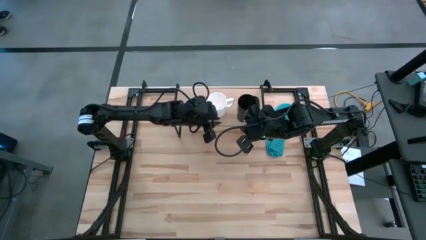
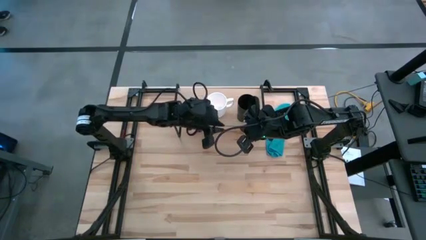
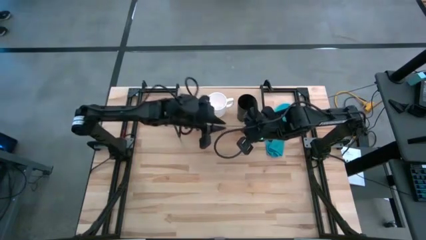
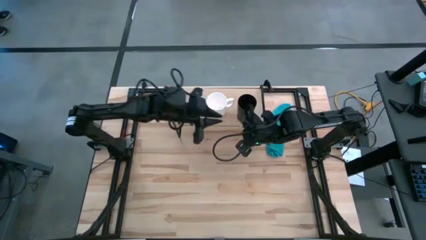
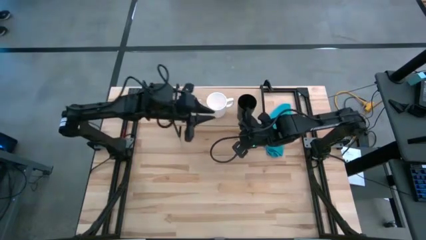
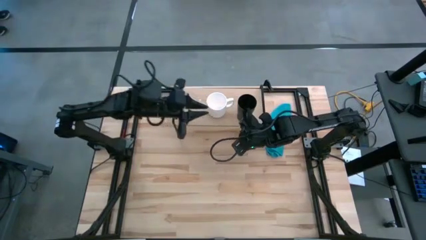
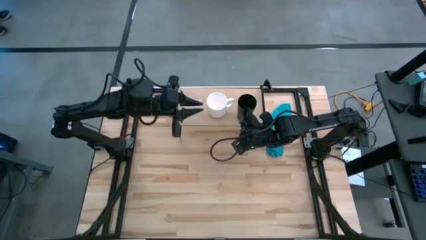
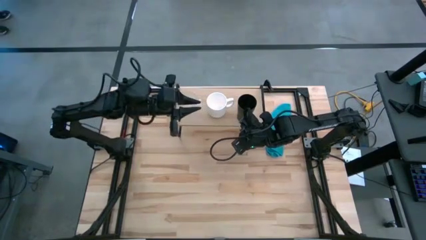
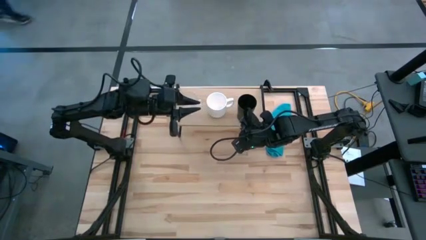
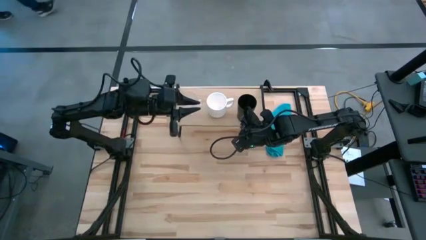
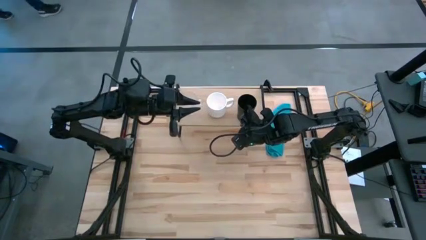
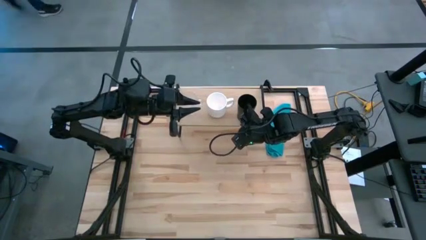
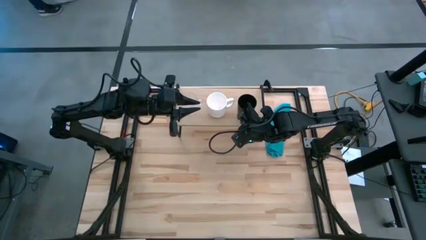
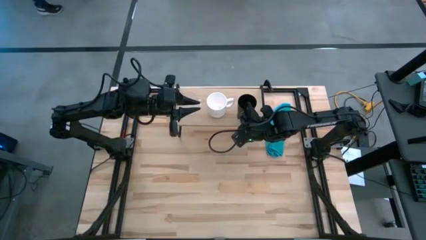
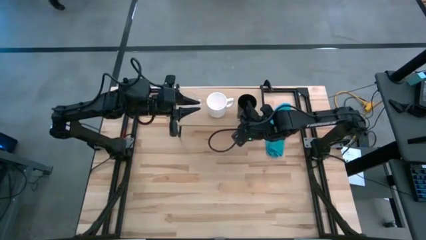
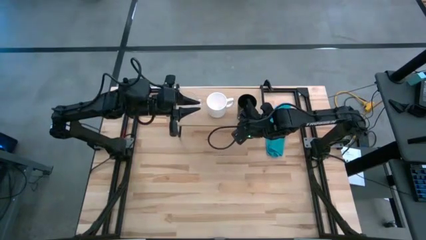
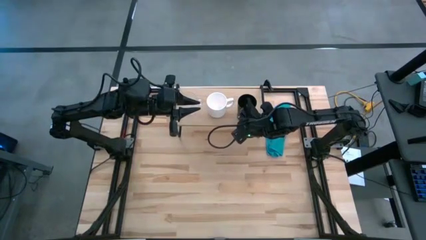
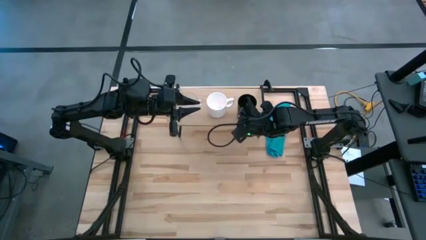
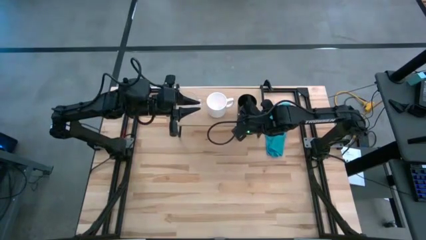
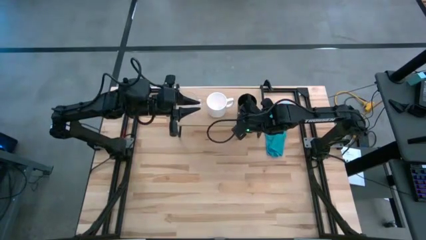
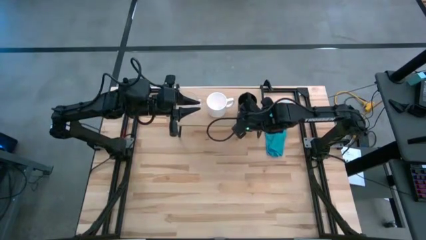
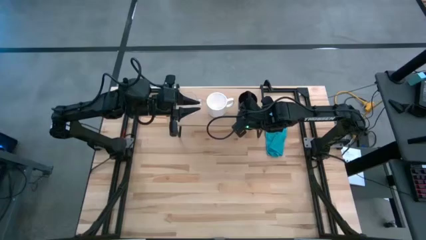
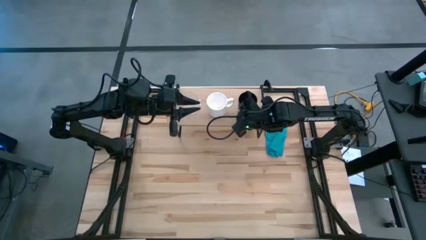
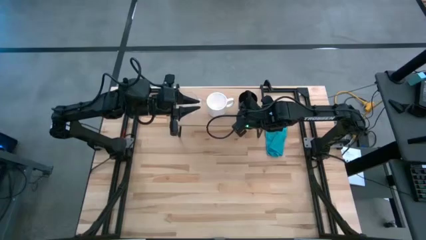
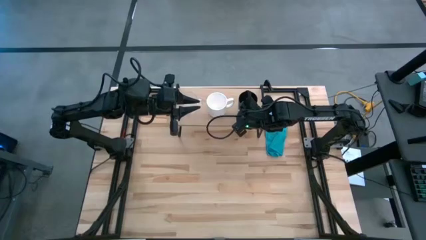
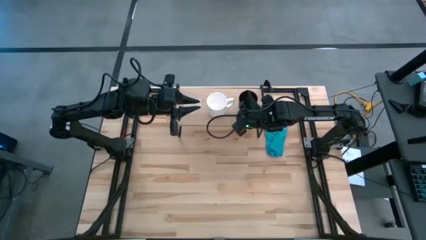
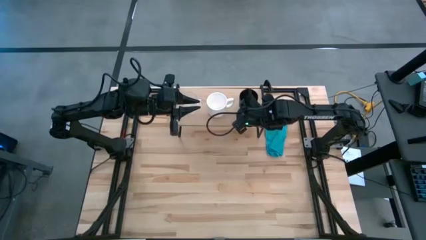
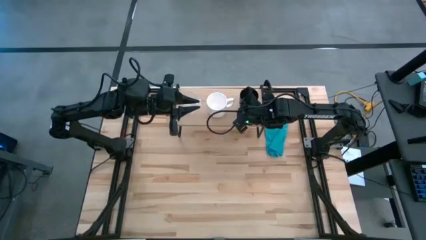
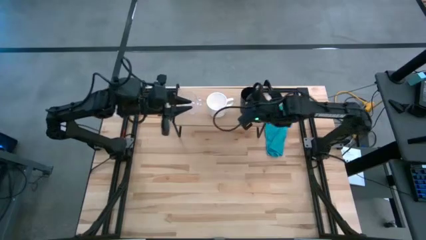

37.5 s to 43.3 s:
Task: Stack small to large cups/mugs on shelf
Adjust the black glass on the shelf

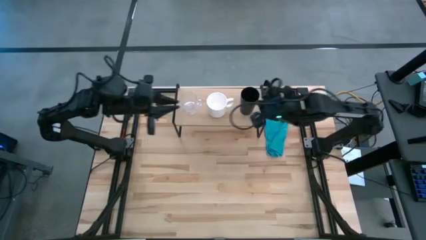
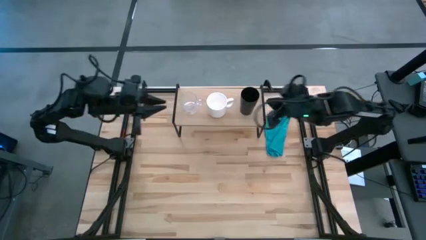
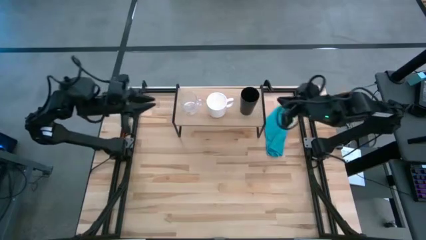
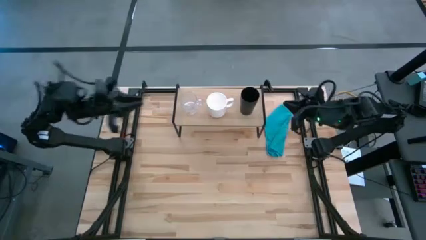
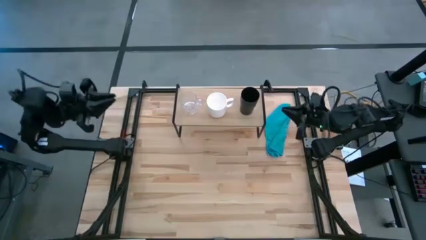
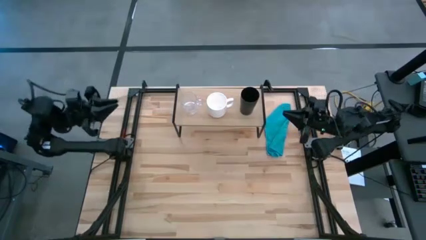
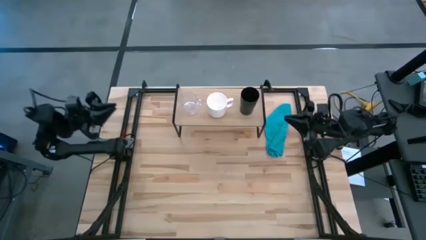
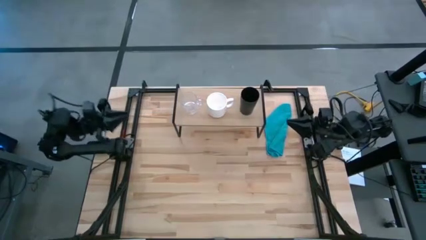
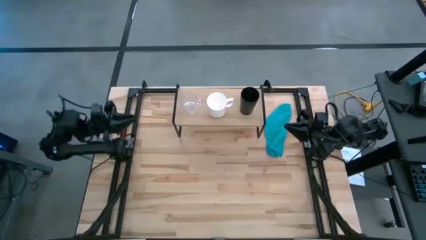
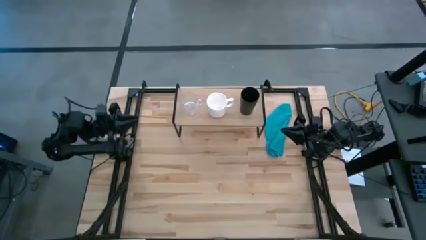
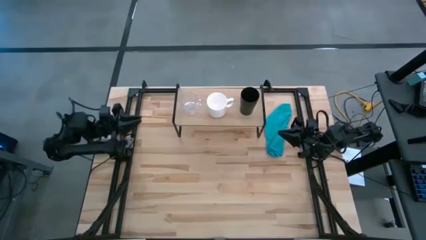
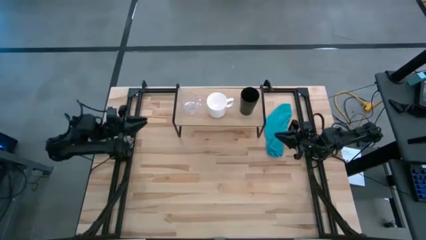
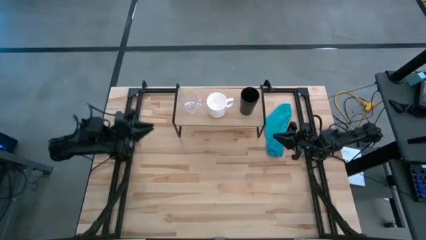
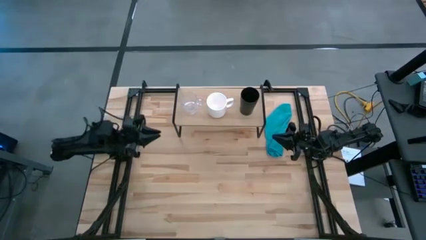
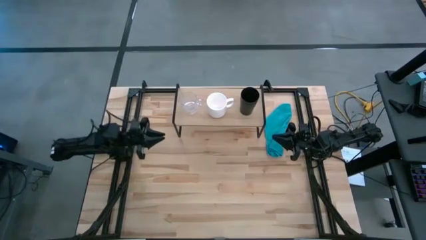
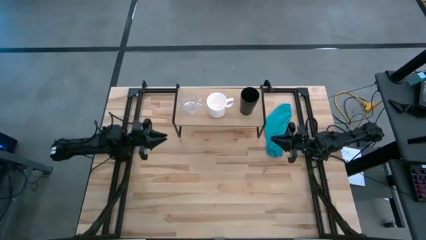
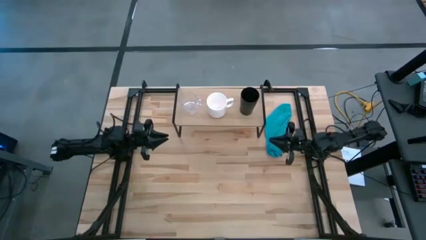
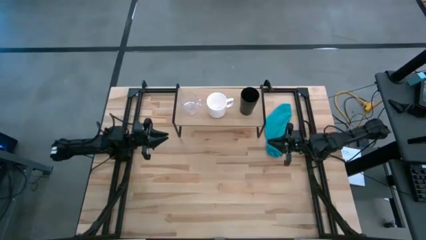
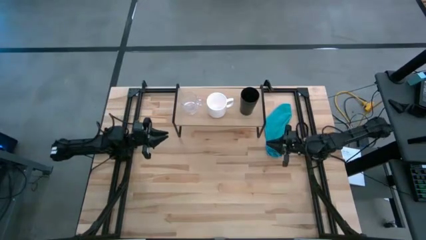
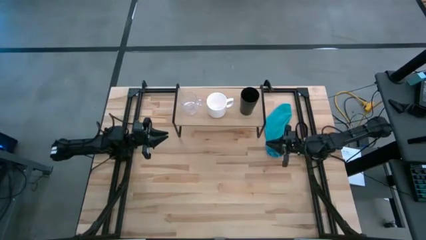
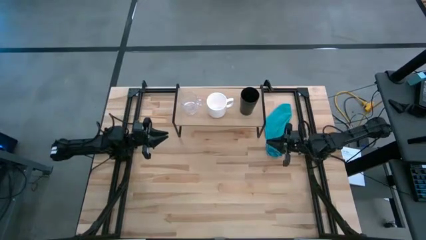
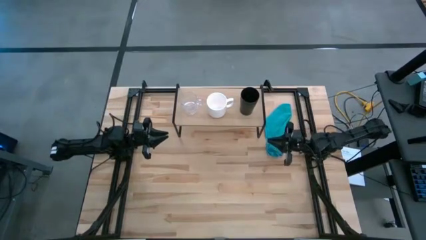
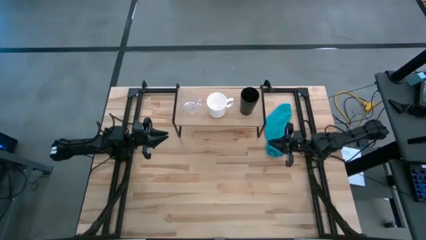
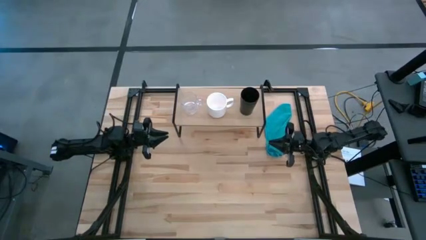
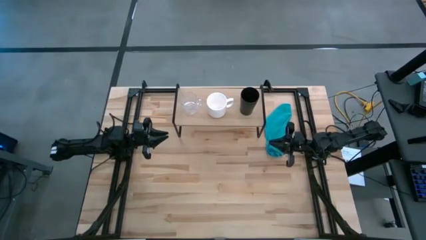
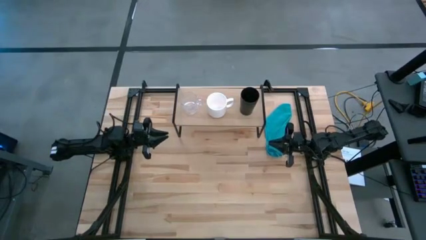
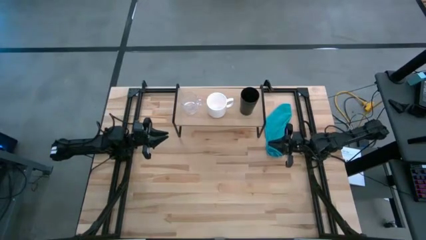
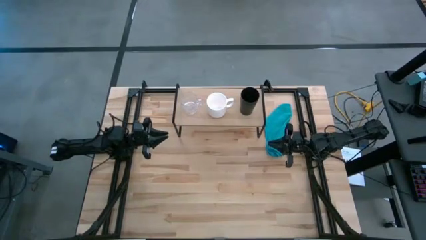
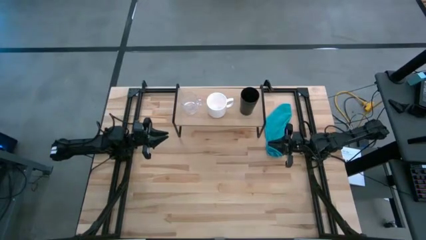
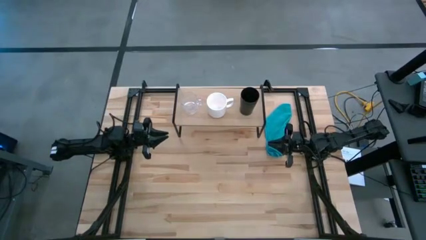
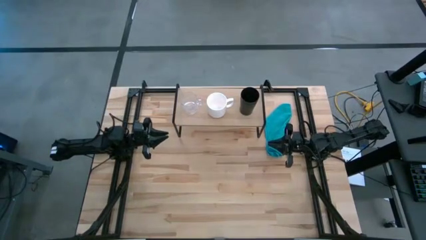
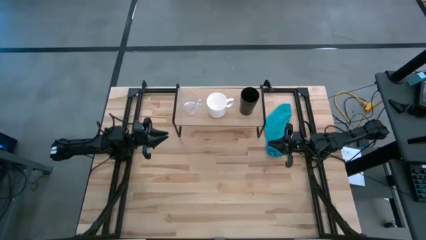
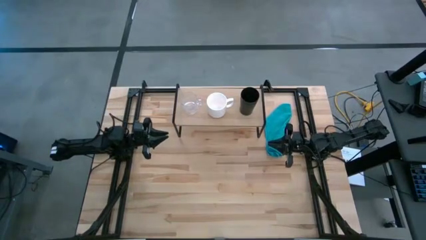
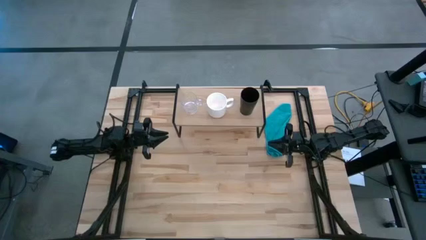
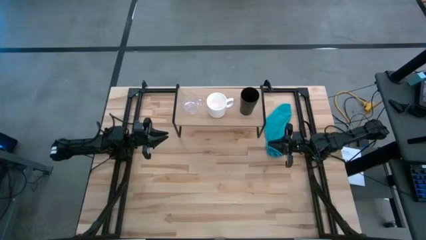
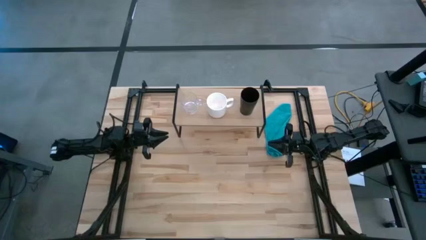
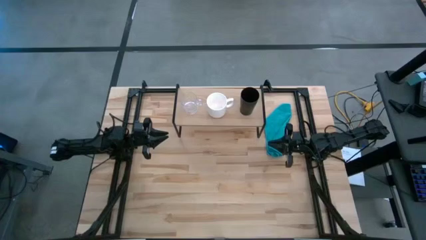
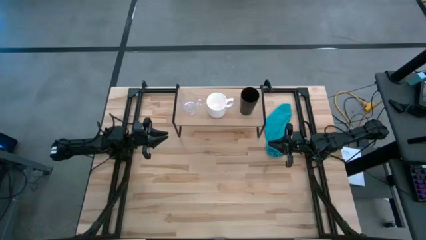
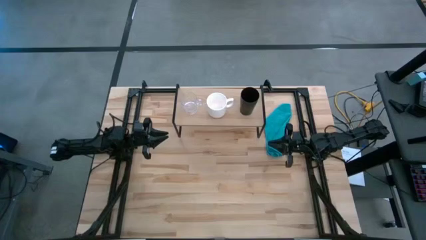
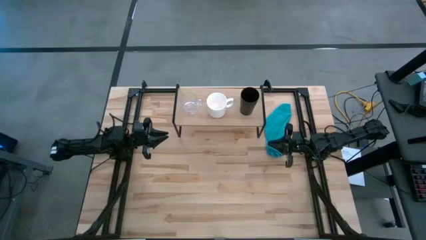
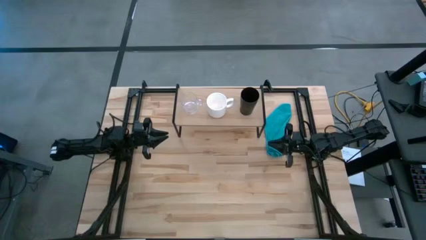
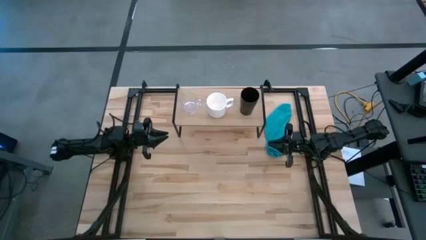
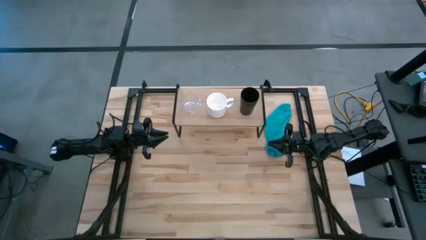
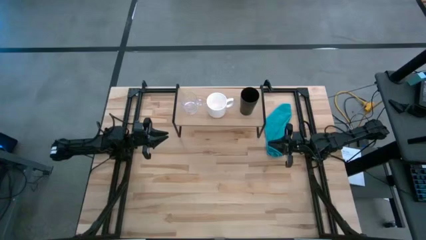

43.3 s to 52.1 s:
Return to Home Position
